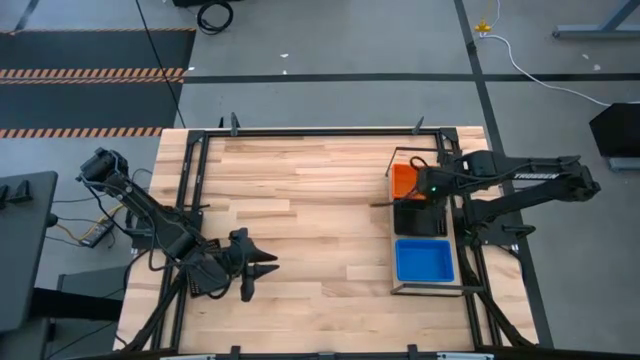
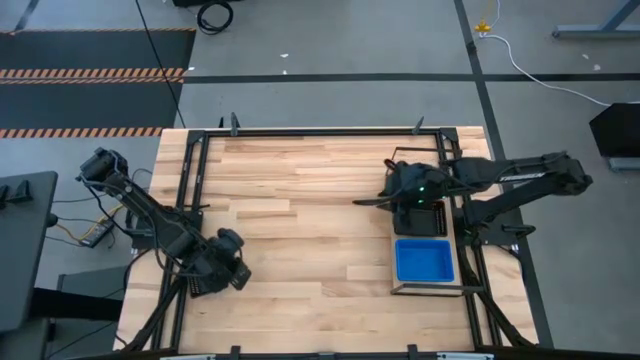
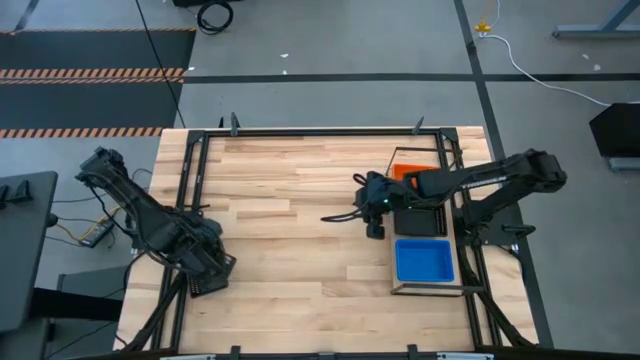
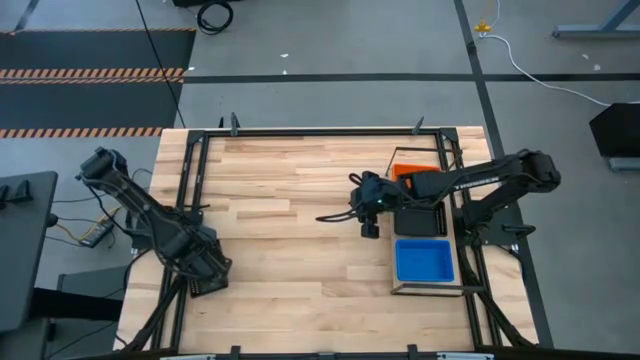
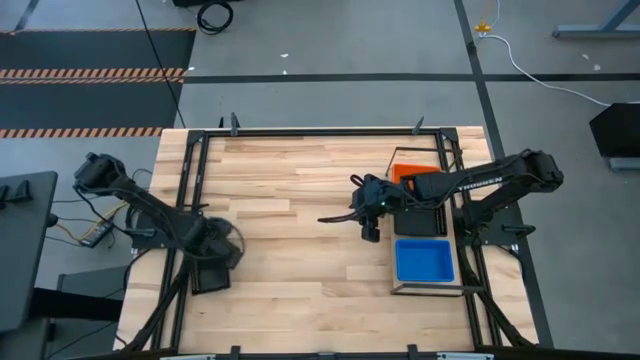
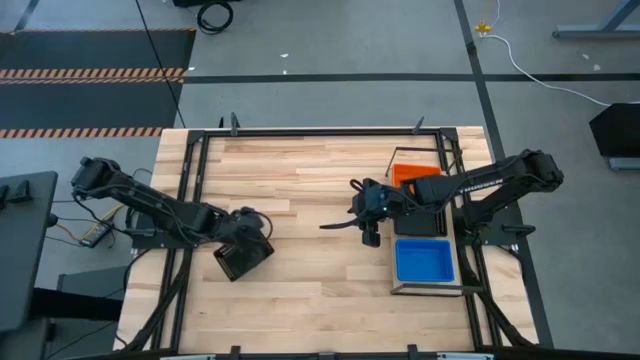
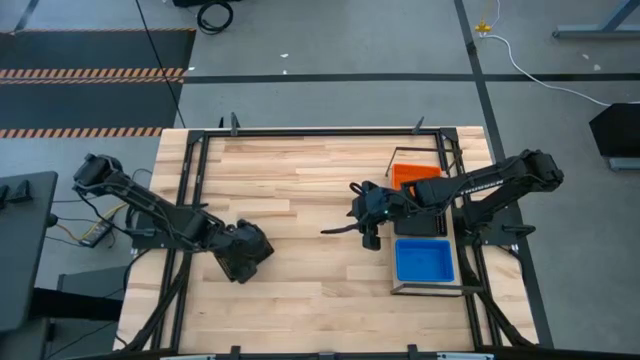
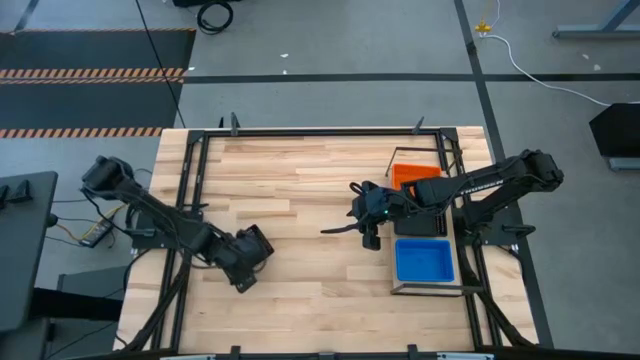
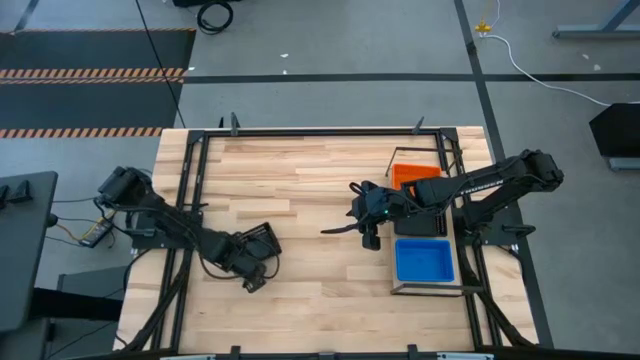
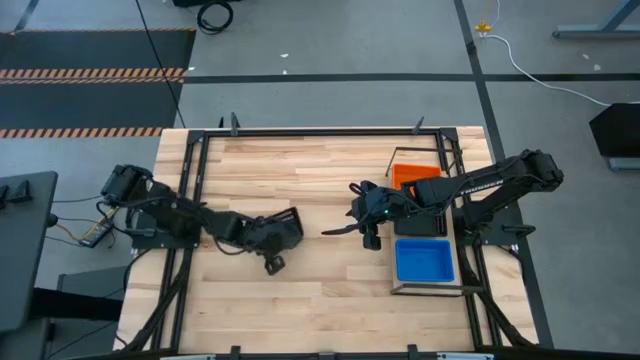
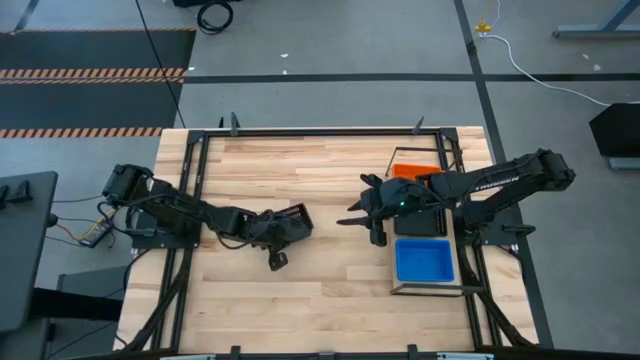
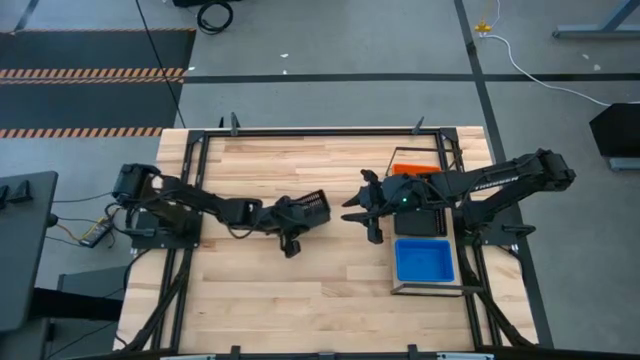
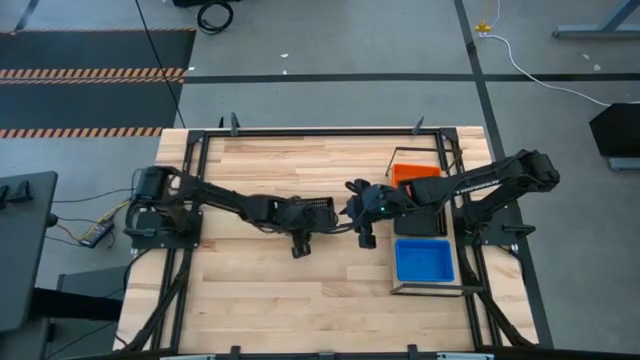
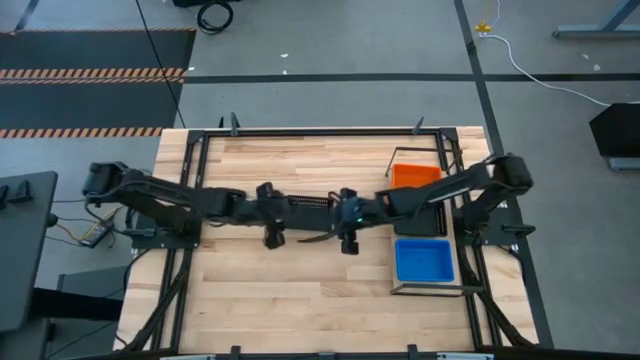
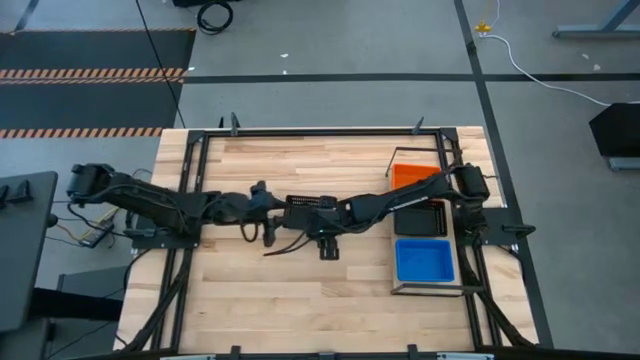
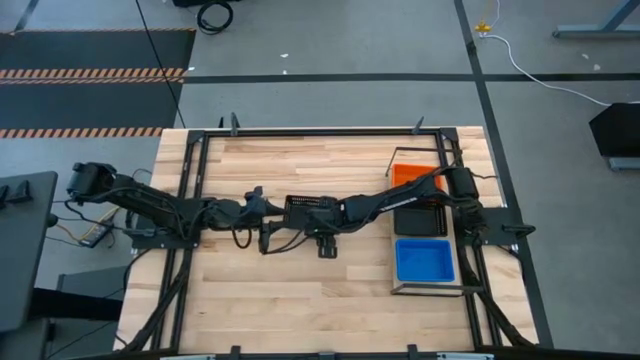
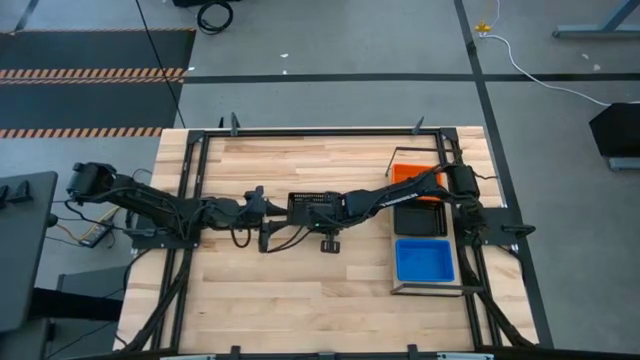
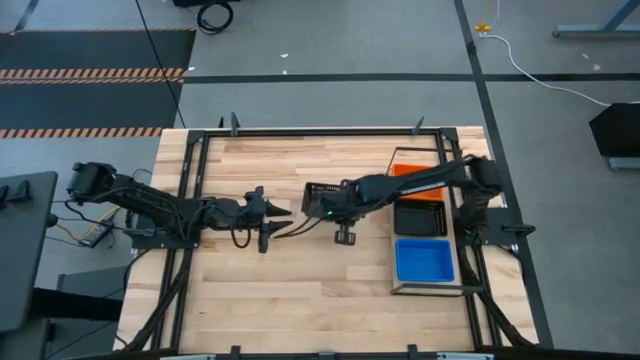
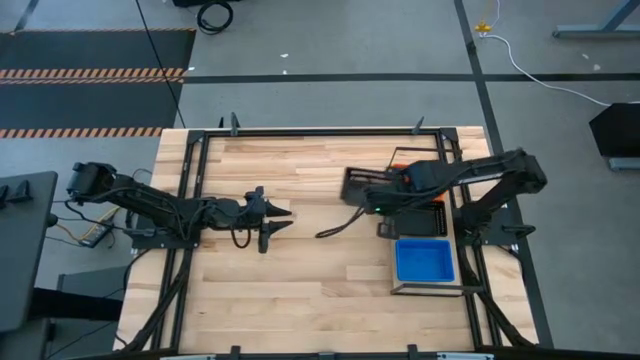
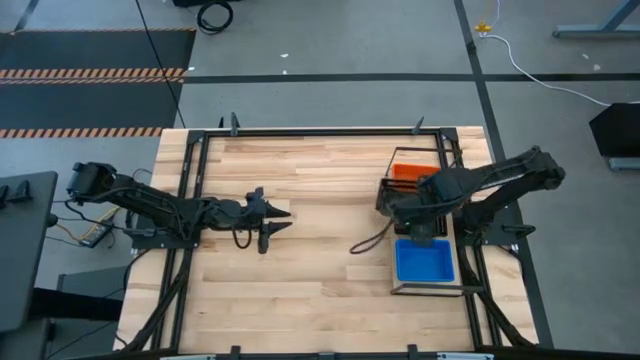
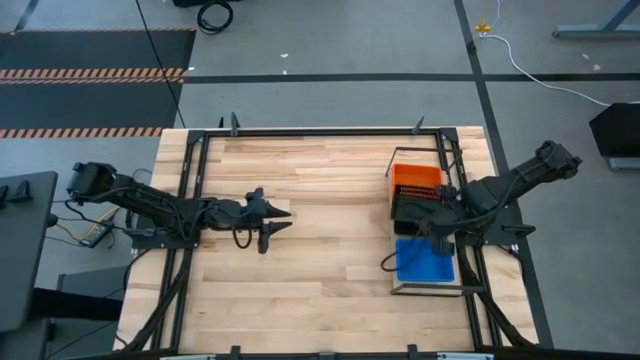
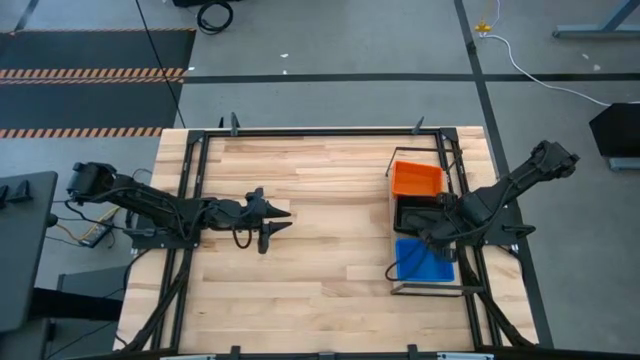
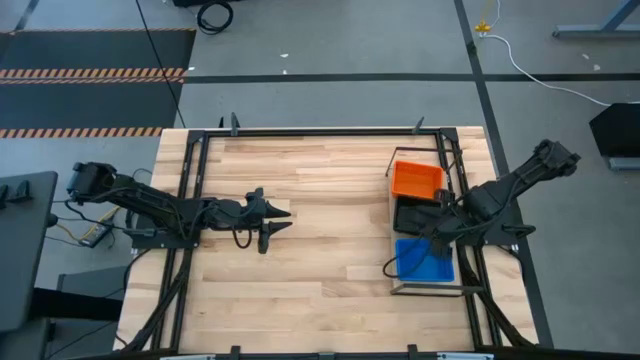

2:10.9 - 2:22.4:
Task: Stack baskets on shelf by color
Stack the black bin on top of the black bin on the shelf

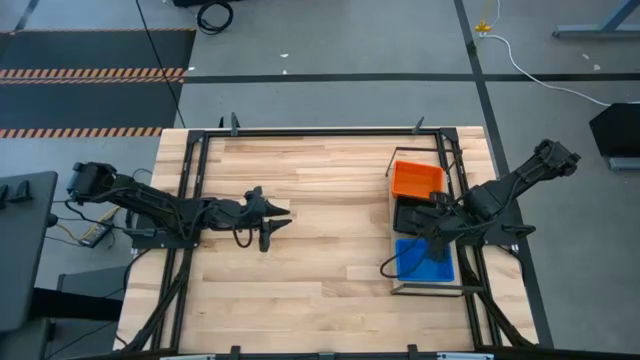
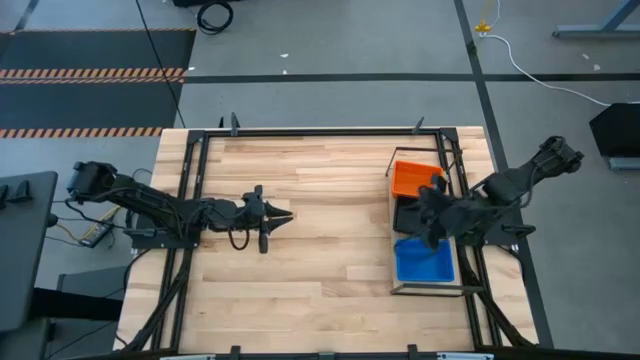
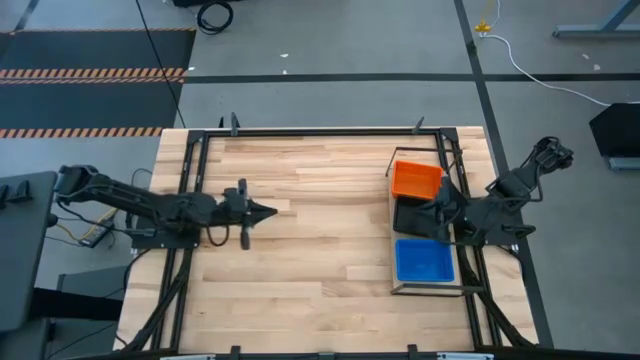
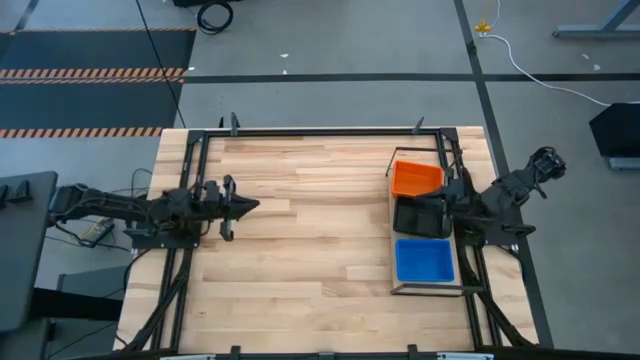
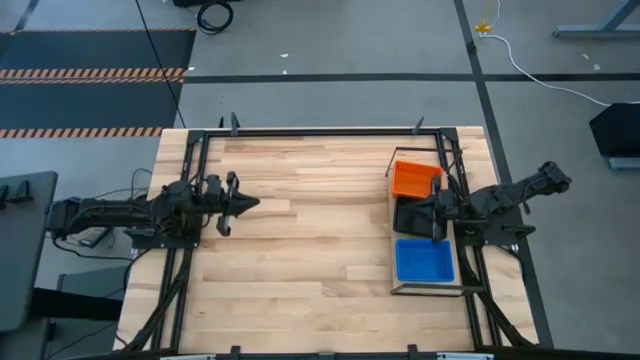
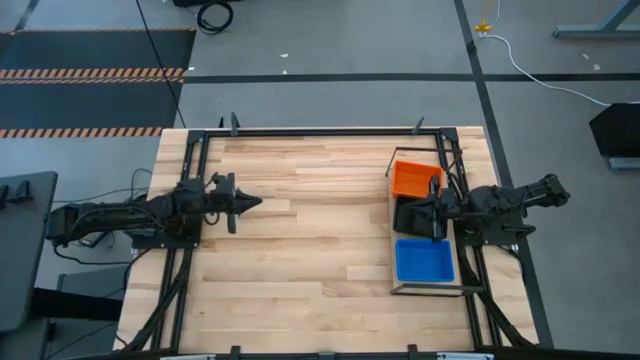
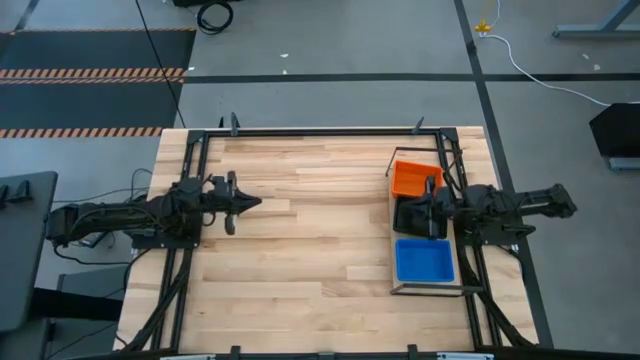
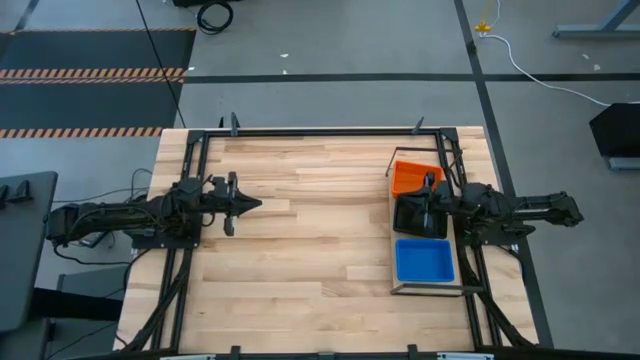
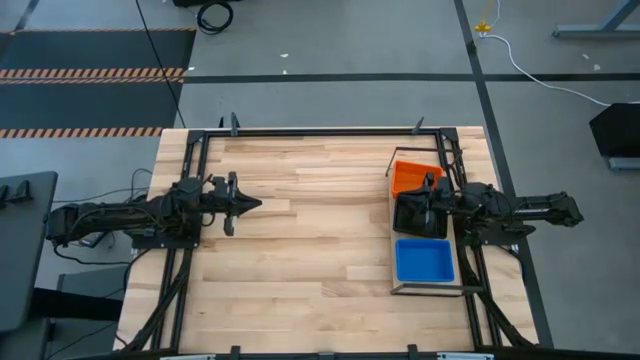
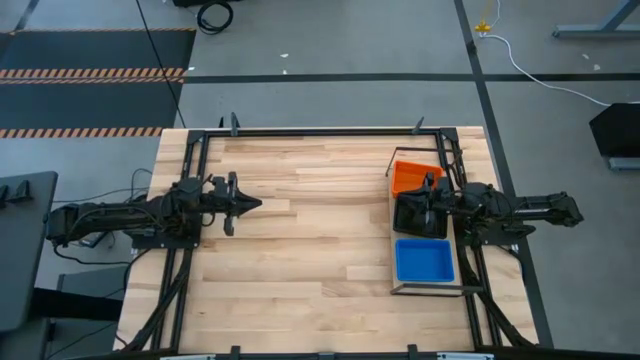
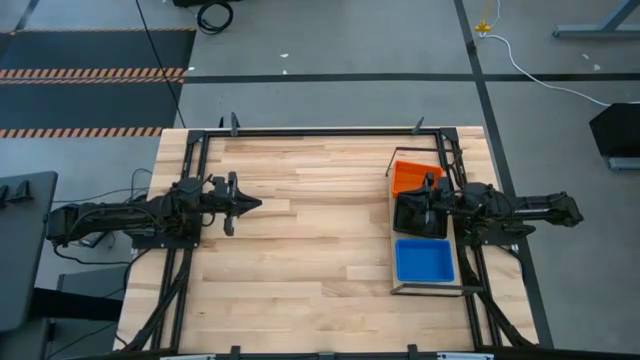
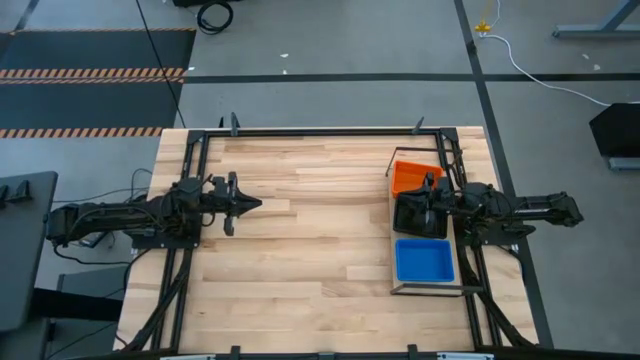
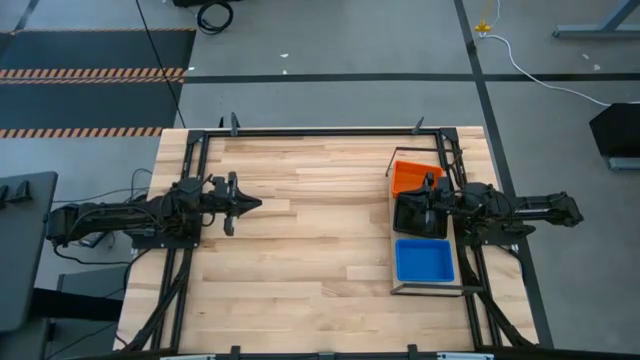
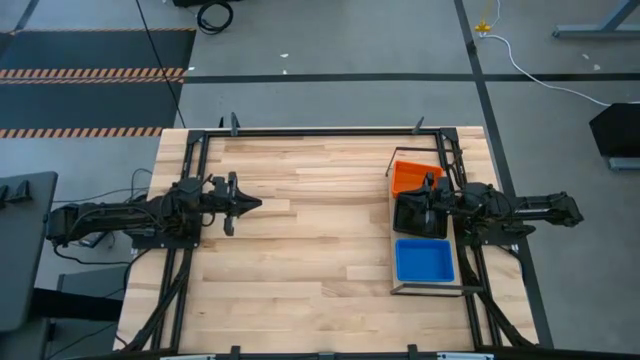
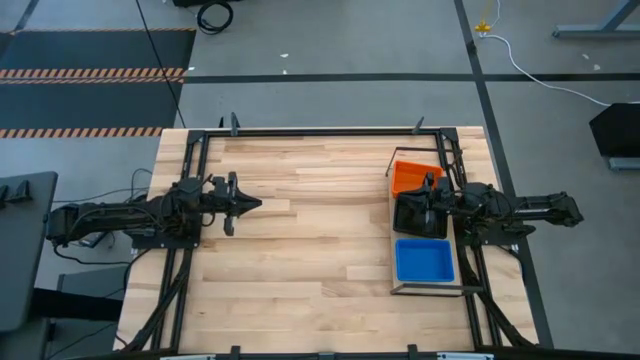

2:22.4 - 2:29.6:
Return to home position
